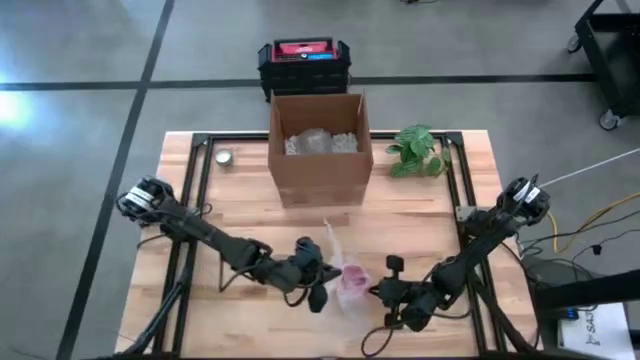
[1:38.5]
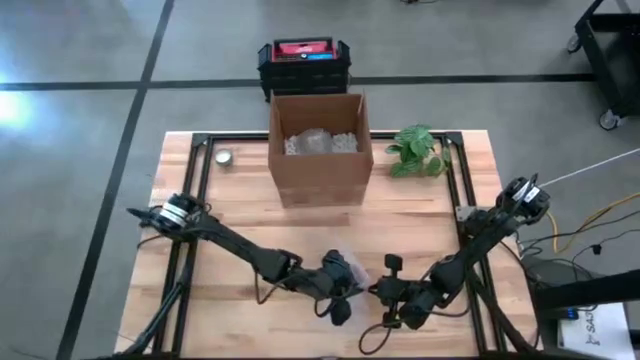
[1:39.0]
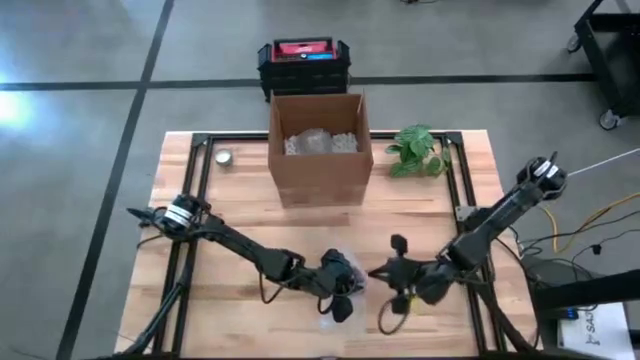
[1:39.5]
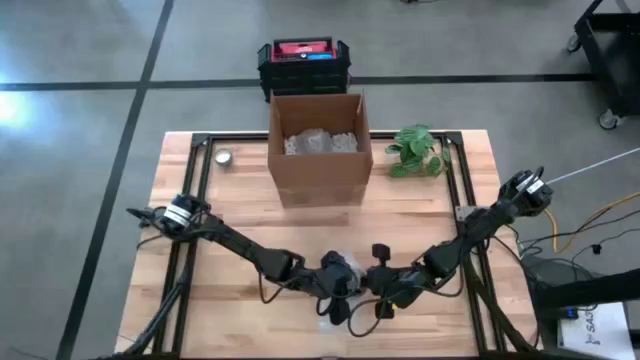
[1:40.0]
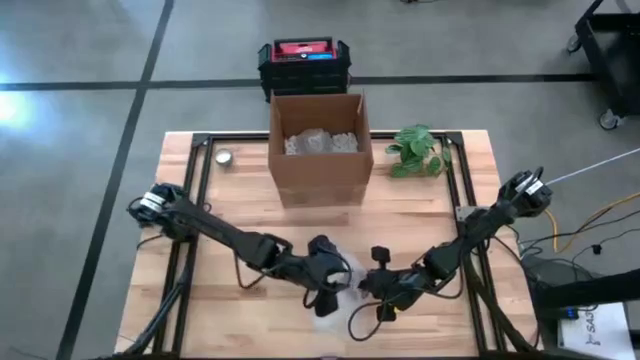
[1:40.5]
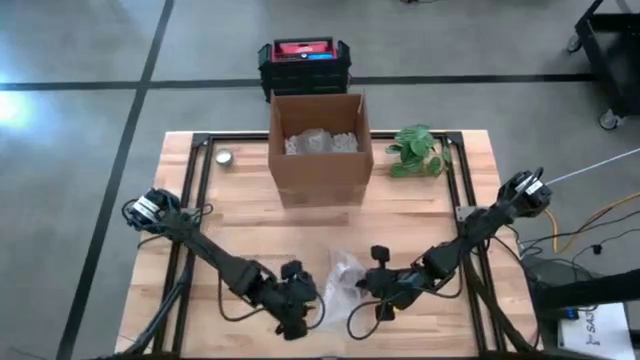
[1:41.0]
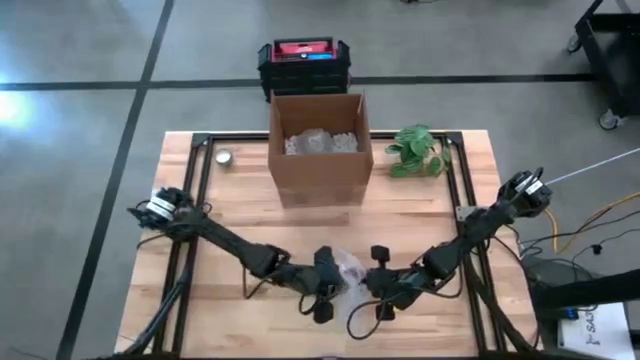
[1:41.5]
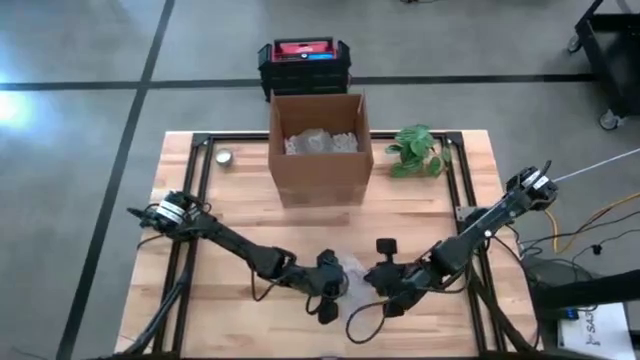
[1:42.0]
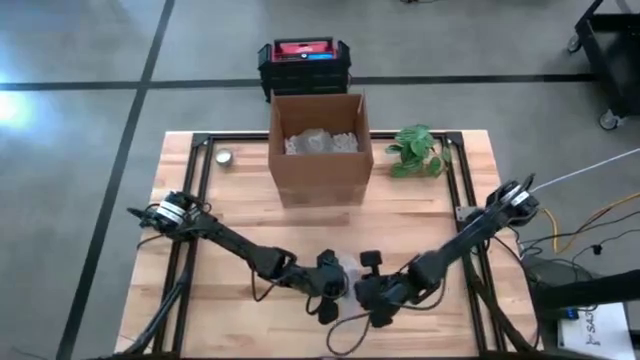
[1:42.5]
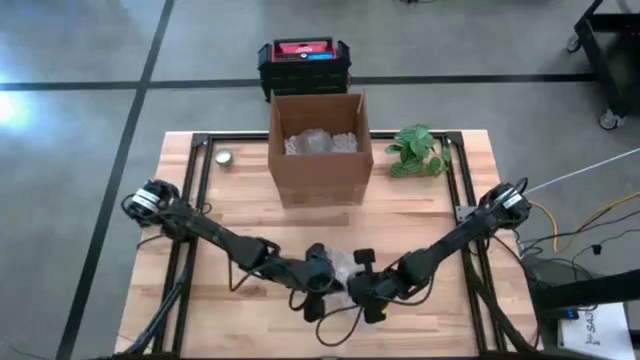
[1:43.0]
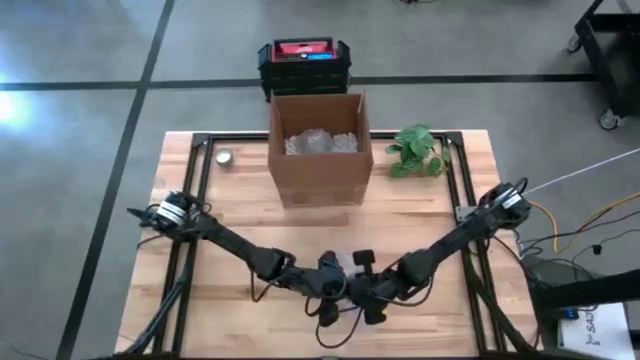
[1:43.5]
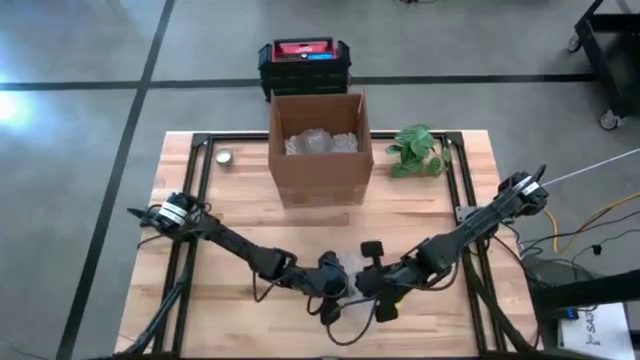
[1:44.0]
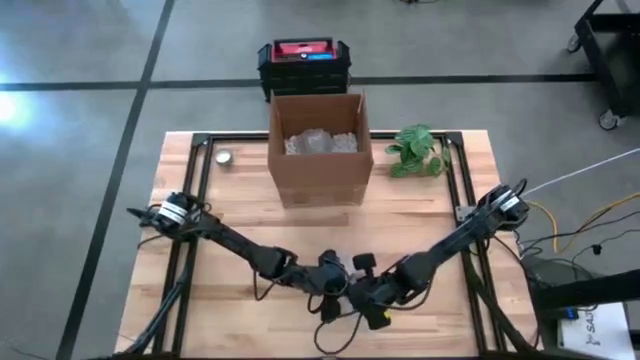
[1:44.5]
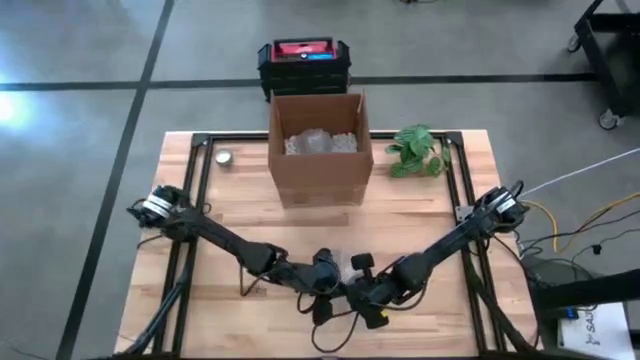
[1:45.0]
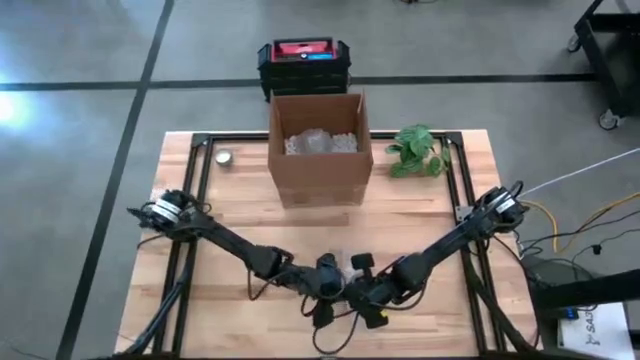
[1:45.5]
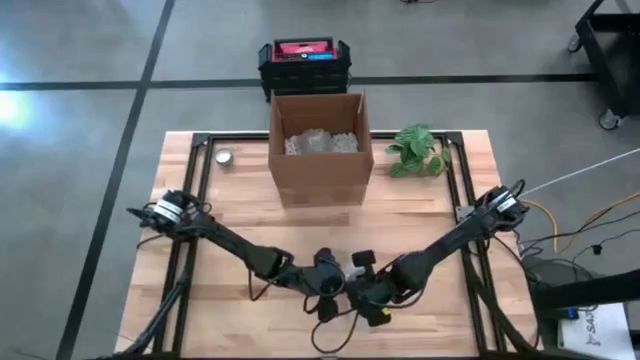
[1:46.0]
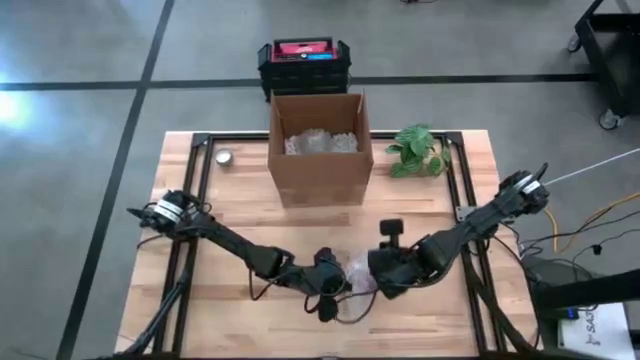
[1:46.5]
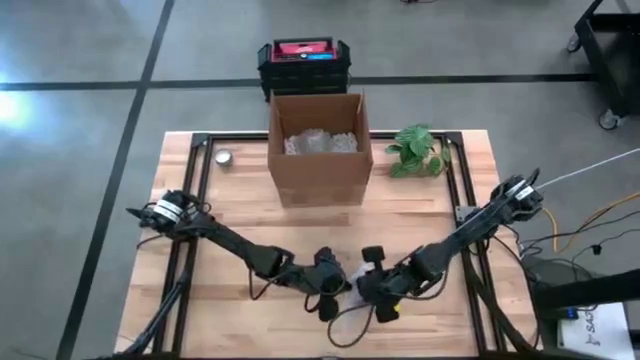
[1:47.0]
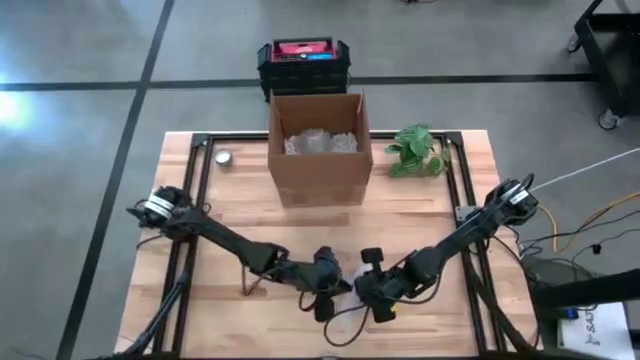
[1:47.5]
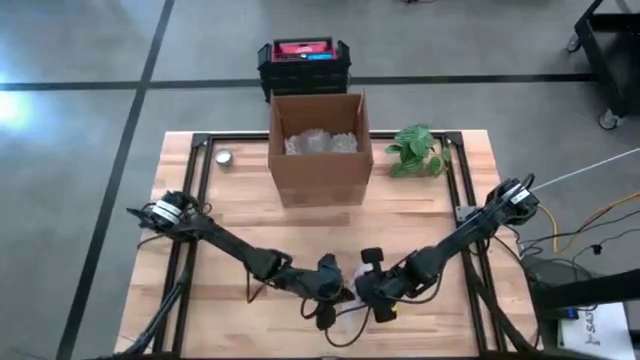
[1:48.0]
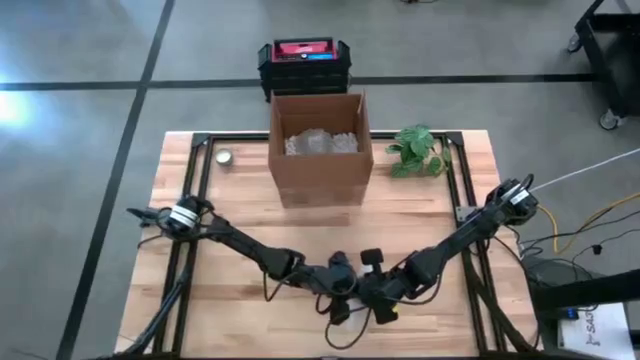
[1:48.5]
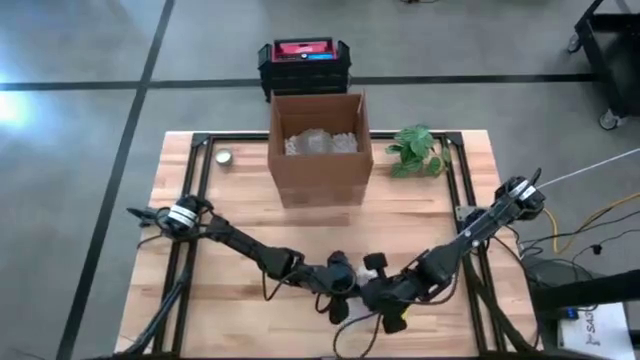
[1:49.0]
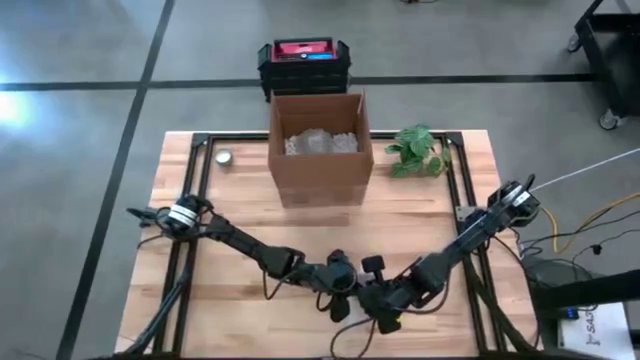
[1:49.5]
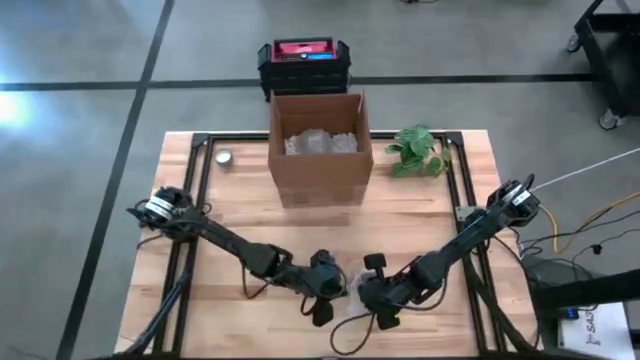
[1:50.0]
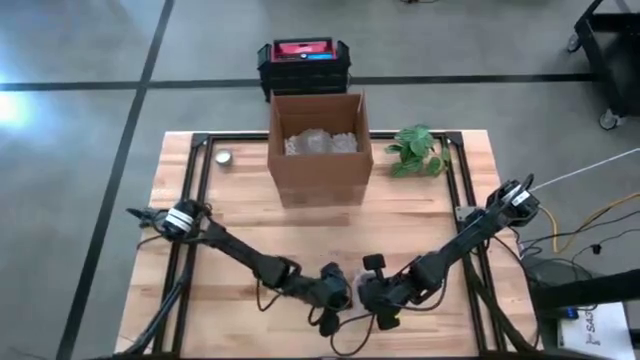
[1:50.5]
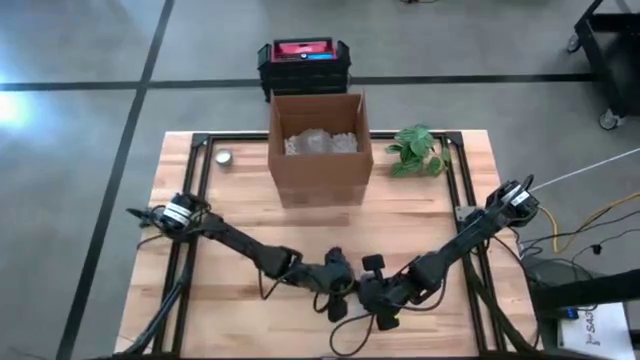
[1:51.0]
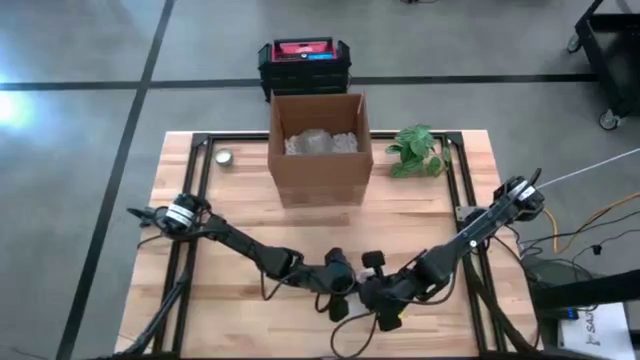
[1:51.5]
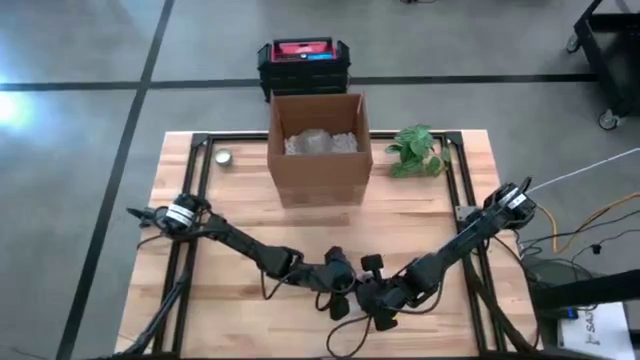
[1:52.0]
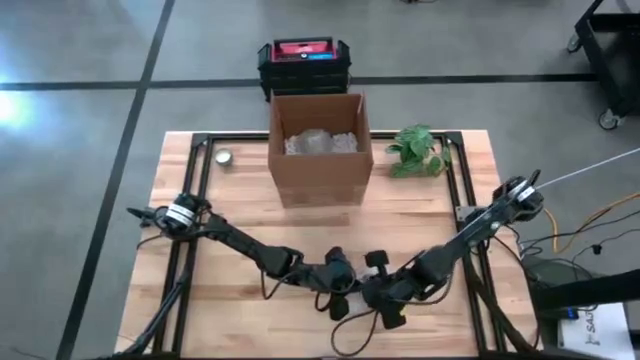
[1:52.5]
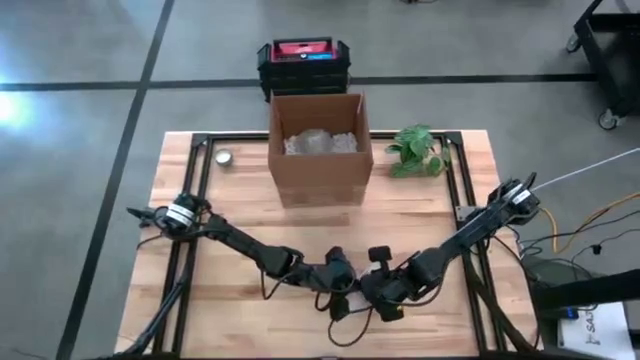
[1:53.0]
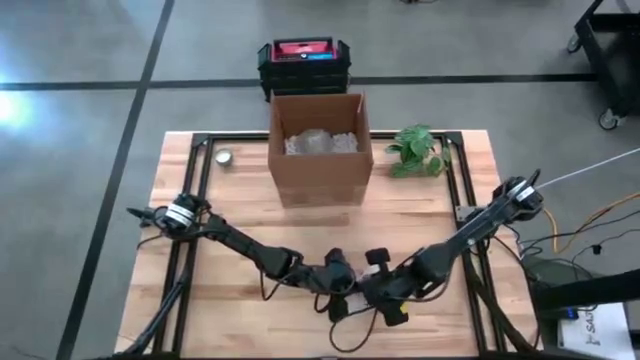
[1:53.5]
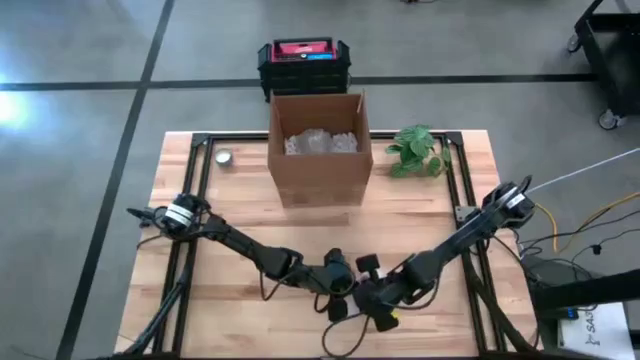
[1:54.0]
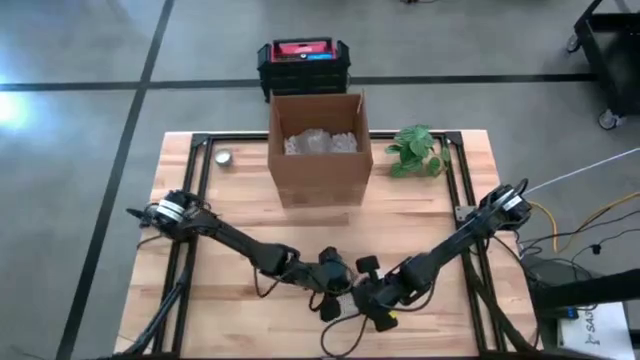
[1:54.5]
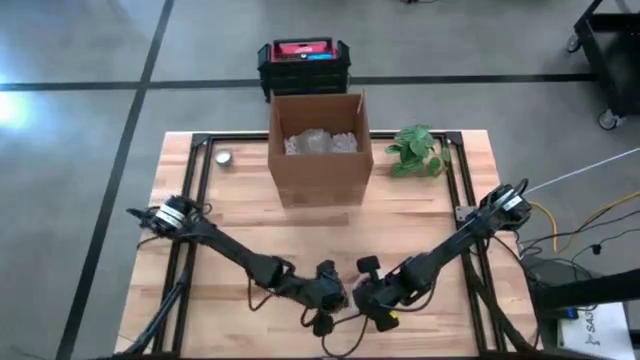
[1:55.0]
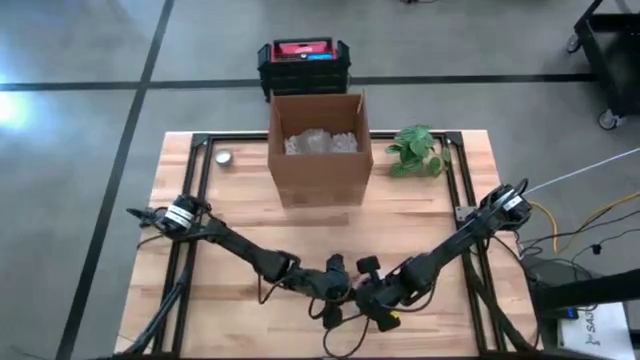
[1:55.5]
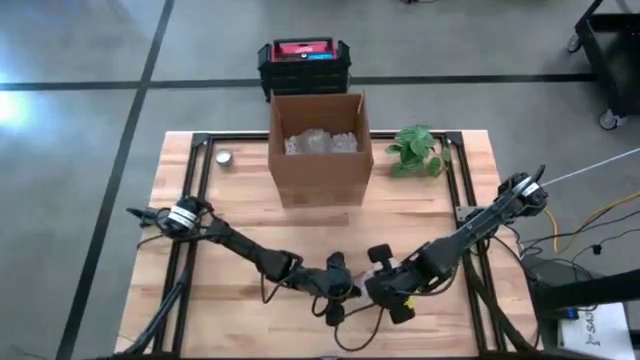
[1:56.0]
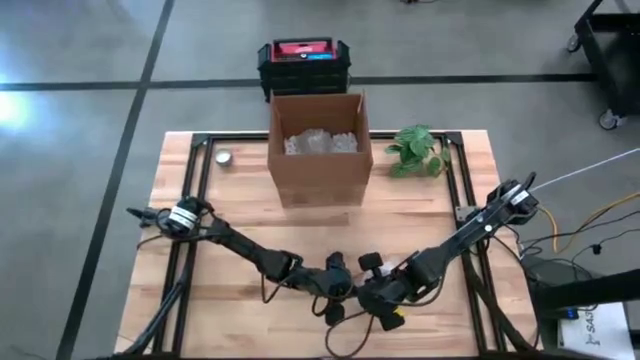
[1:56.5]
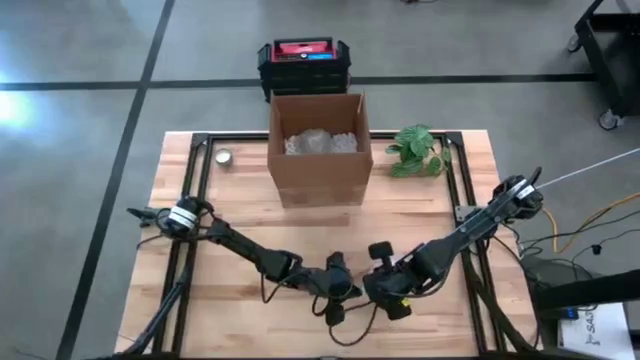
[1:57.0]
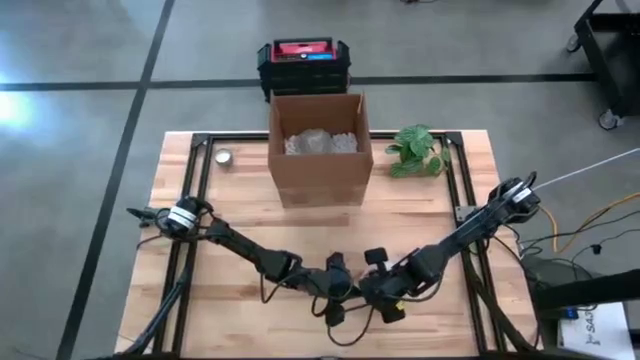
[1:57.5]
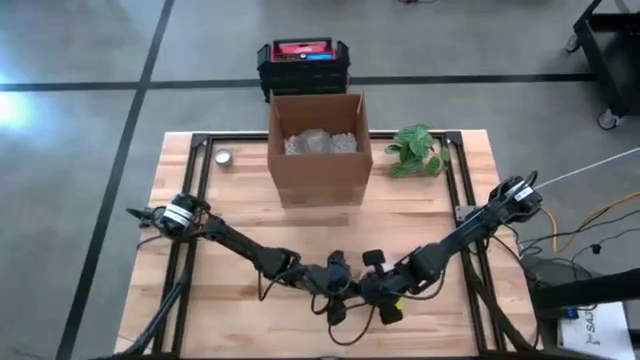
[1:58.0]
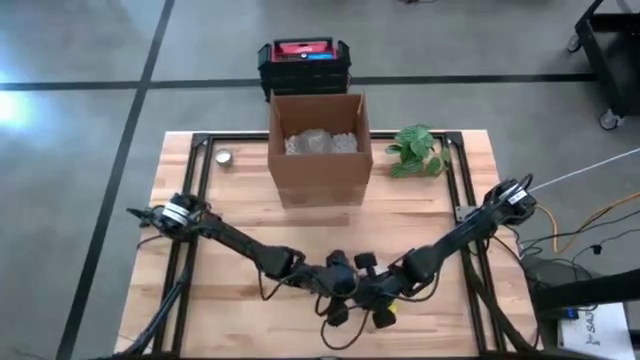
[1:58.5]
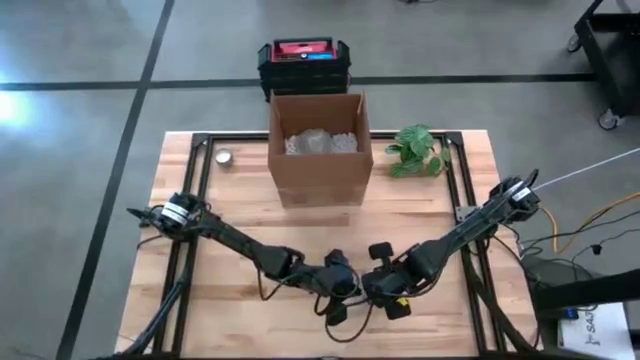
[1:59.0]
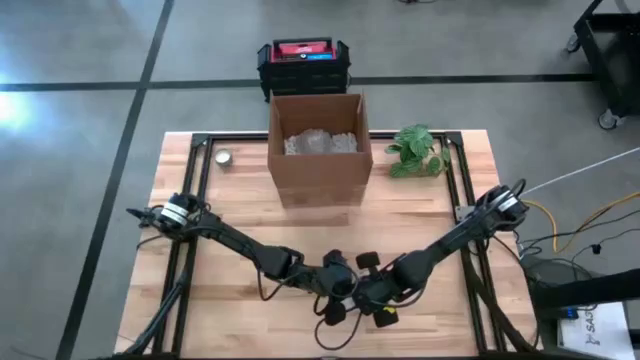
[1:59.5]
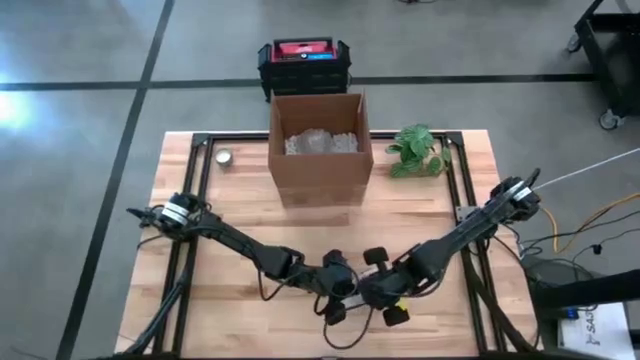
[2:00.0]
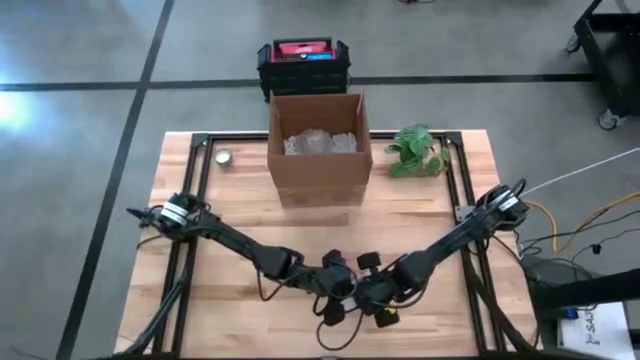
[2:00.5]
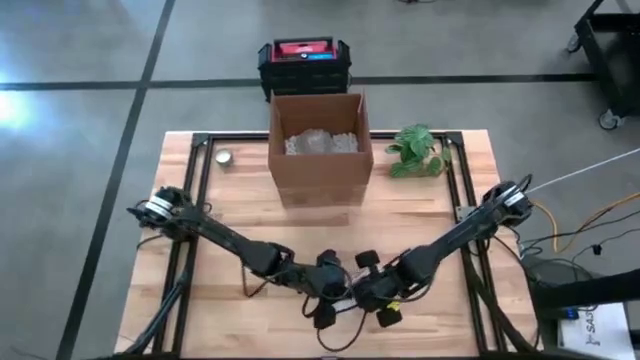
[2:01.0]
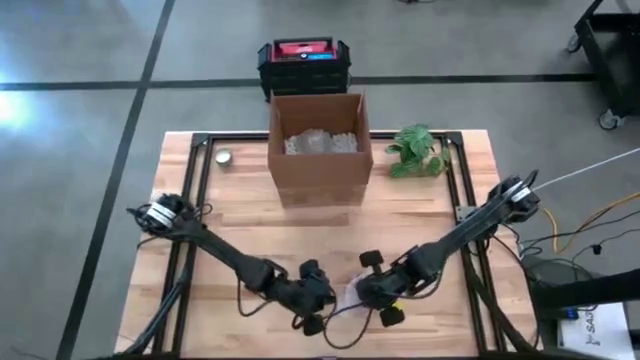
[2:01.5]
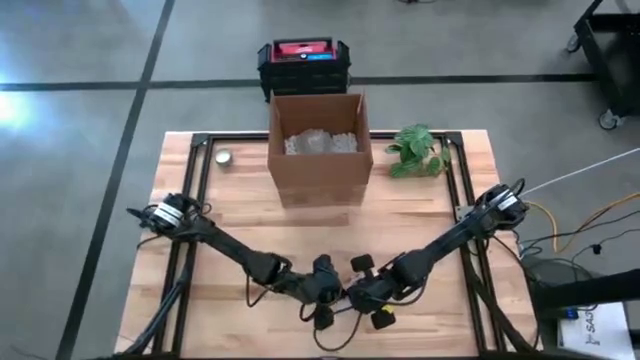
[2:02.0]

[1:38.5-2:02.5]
Task: wrap mug
Wrap the orange mug with bubble wrap
